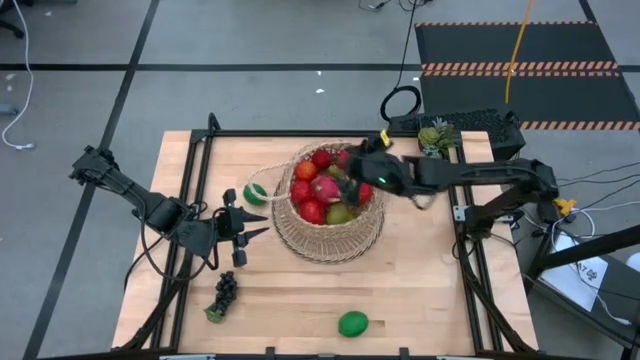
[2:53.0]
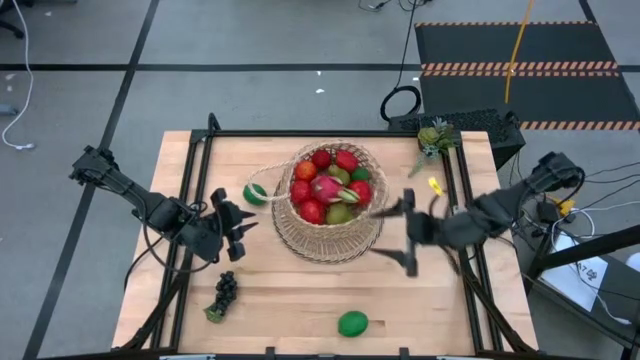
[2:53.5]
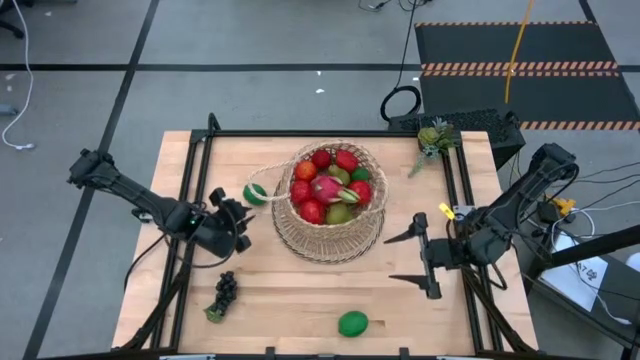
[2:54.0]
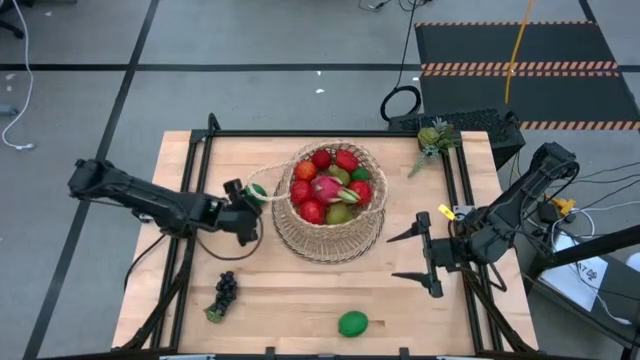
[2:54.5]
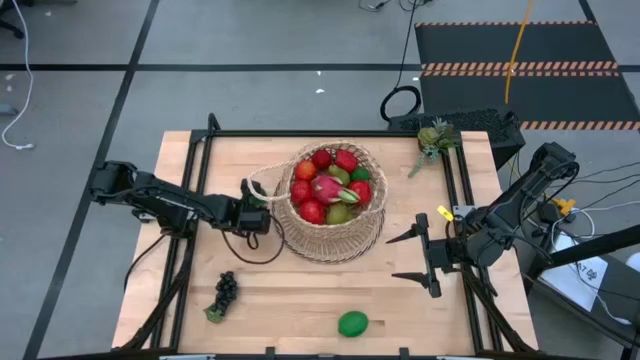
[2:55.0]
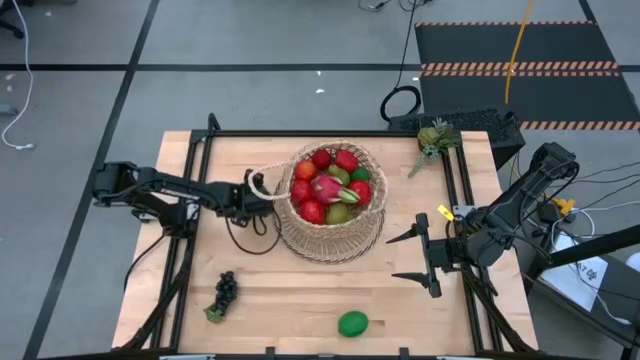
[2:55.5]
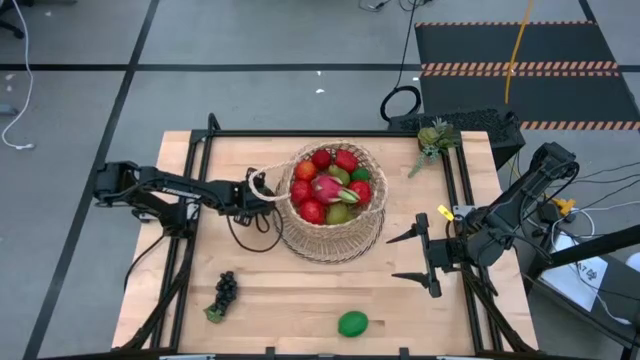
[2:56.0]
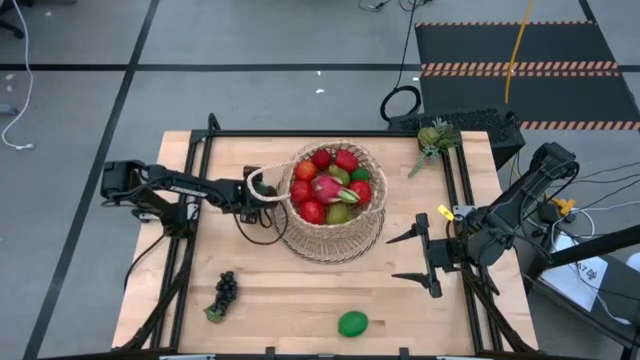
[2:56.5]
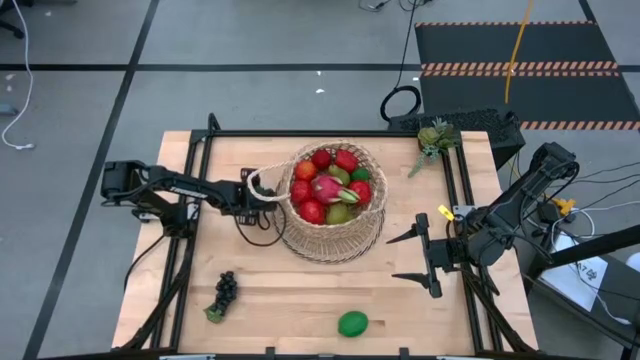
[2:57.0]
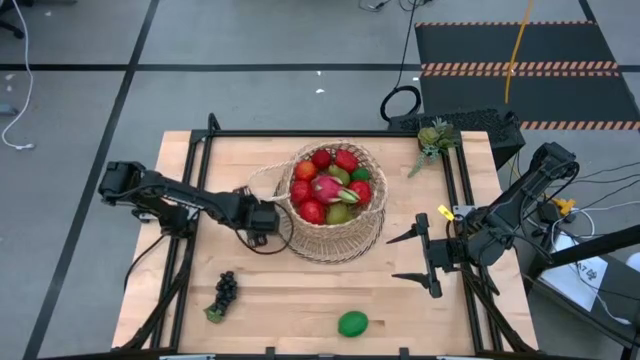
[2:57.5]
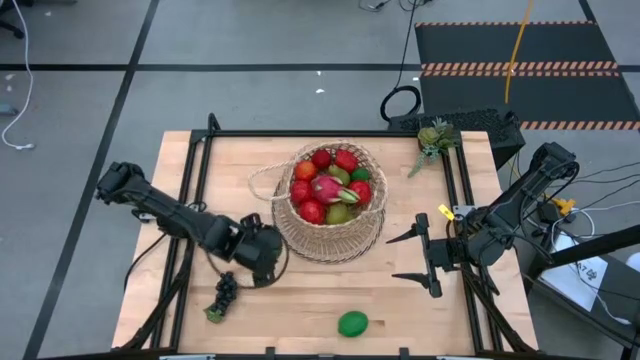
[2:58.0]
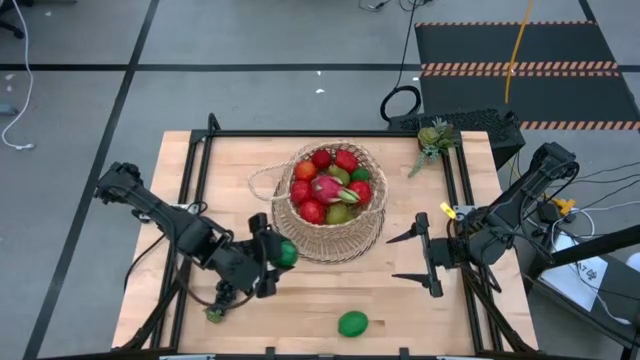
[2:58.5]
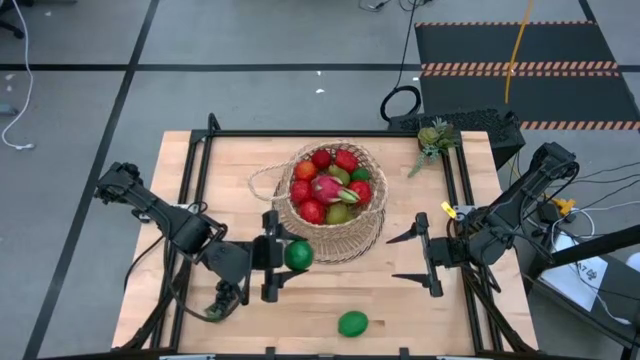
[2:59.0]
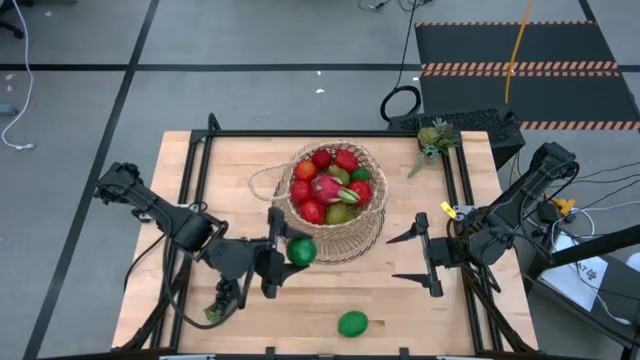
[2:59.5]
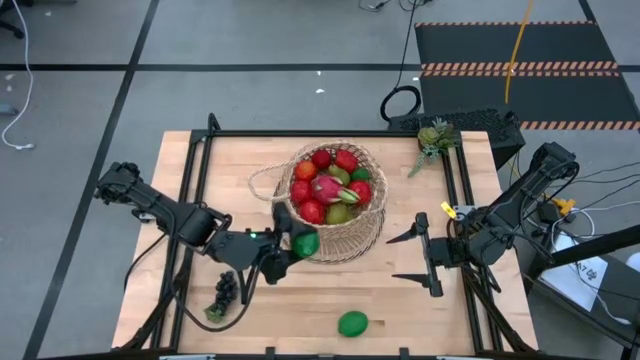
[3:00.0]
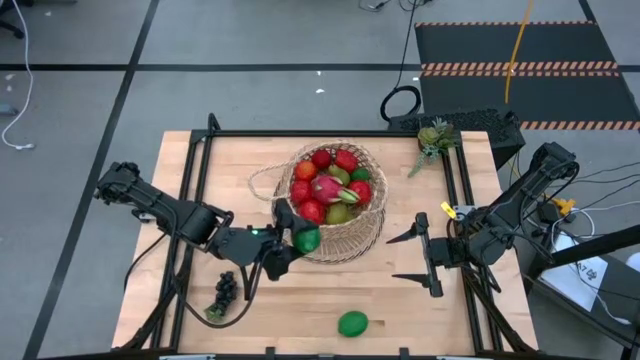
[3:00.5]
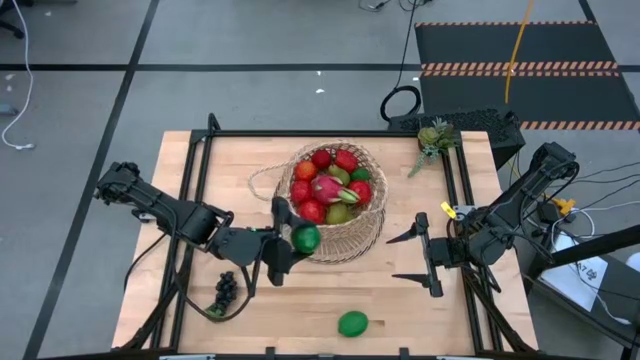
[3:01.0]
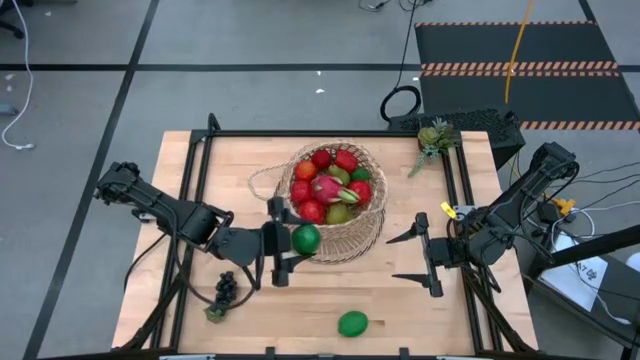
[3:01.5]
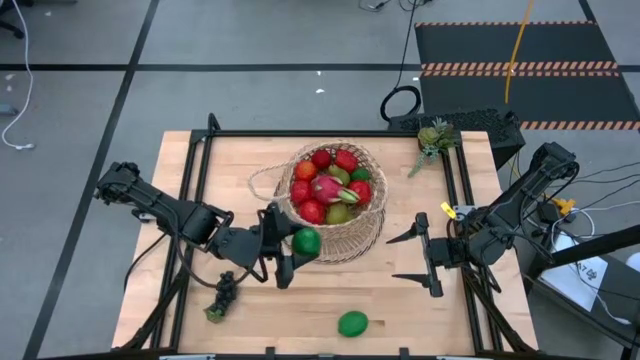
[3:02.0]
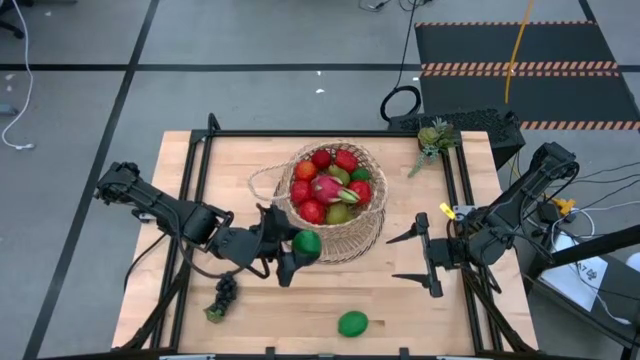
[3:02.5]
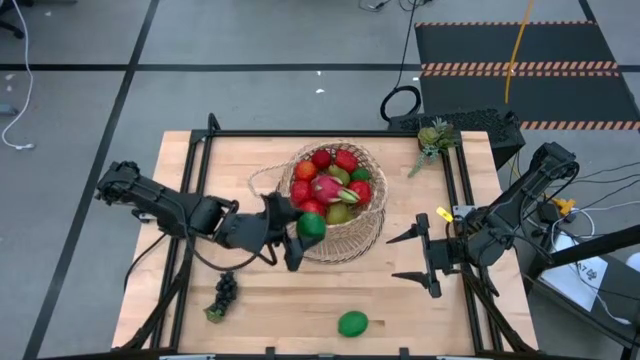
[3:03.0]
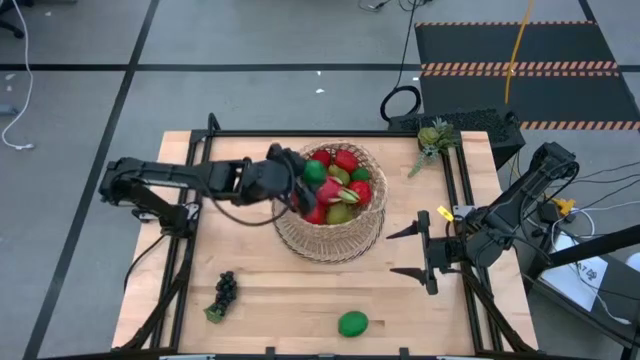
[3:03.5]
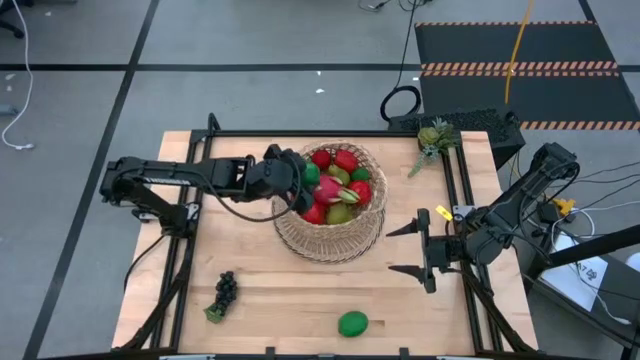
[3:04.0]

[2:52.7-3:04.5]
Task: Build produce basket
Put the left green lime into the basket

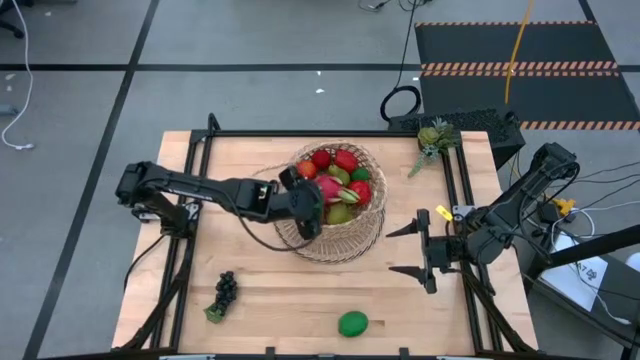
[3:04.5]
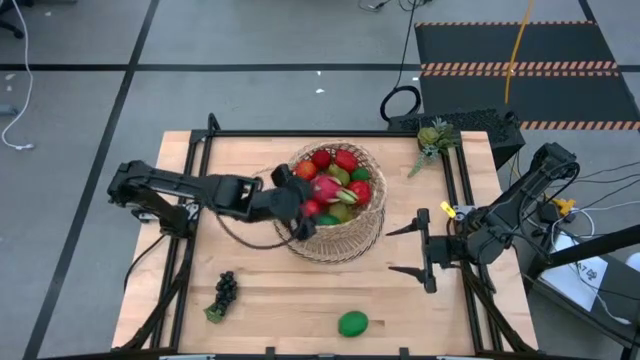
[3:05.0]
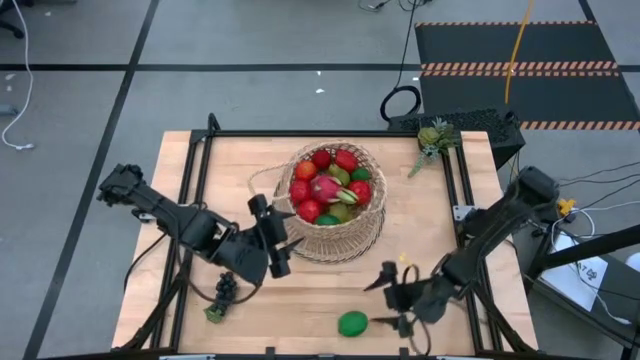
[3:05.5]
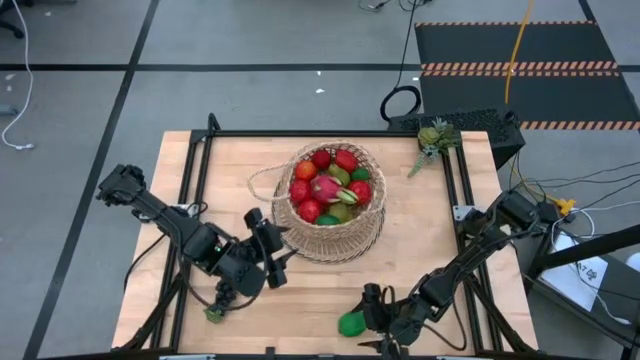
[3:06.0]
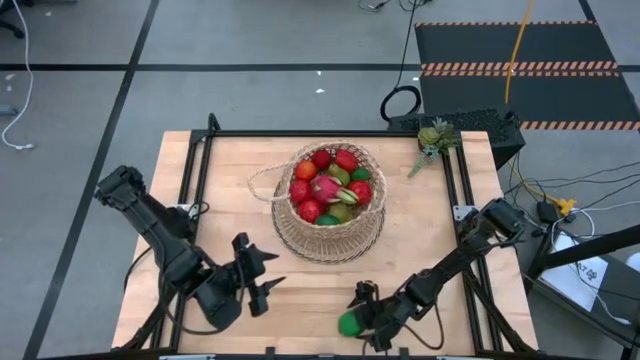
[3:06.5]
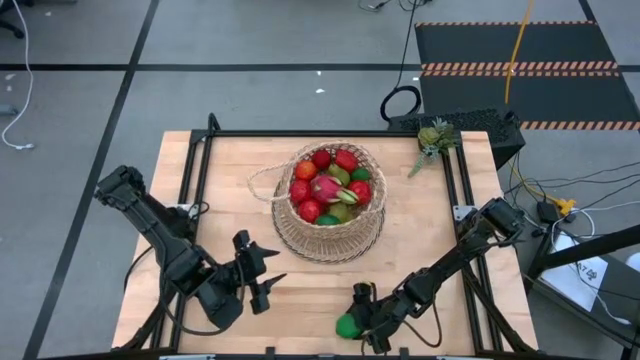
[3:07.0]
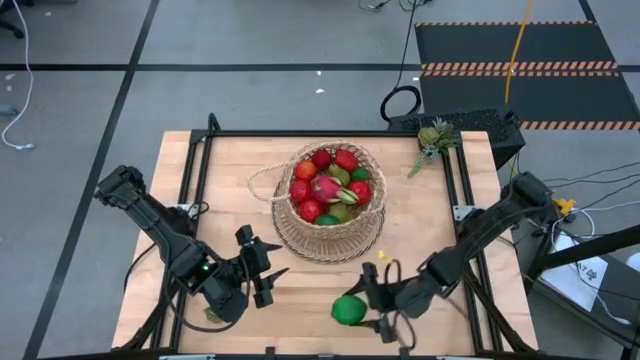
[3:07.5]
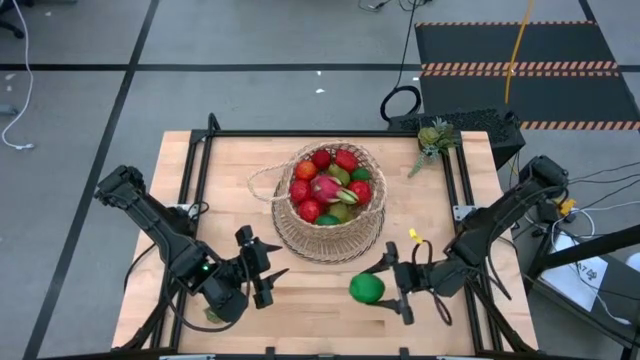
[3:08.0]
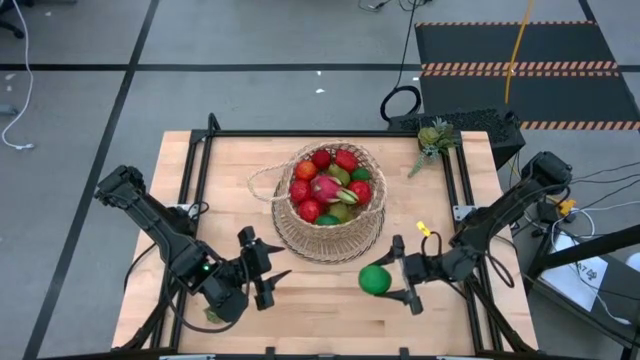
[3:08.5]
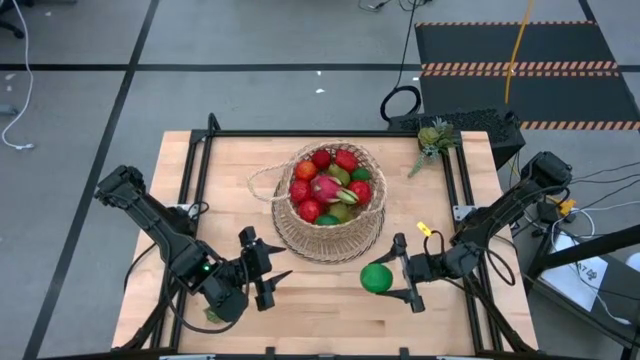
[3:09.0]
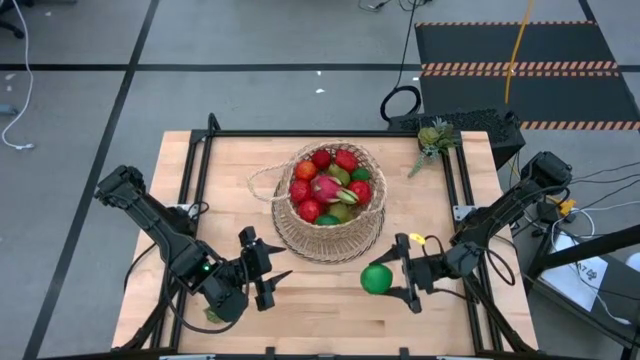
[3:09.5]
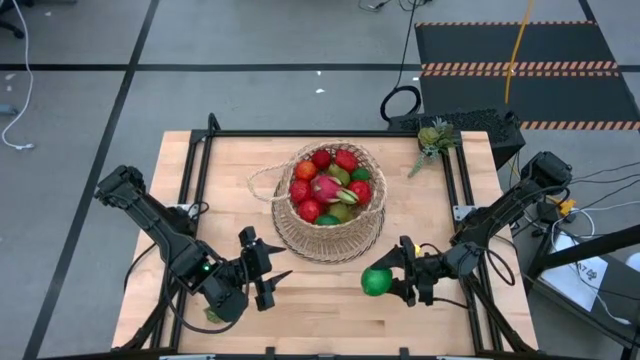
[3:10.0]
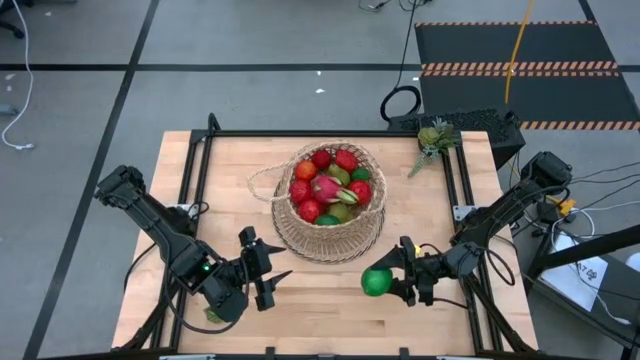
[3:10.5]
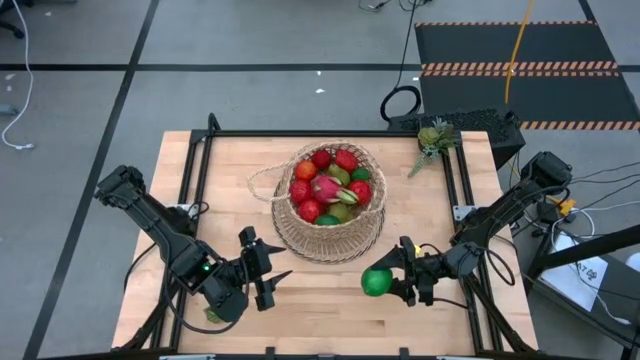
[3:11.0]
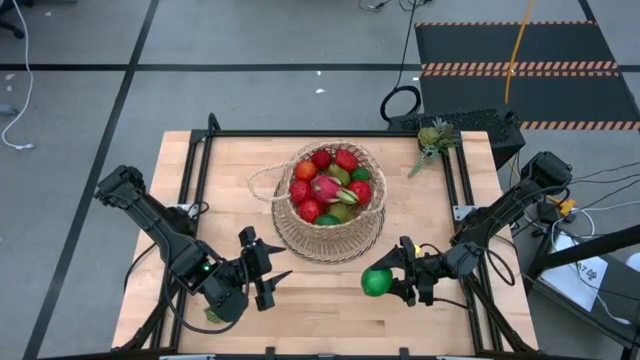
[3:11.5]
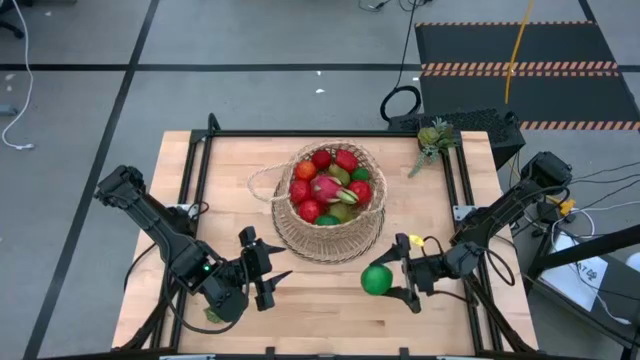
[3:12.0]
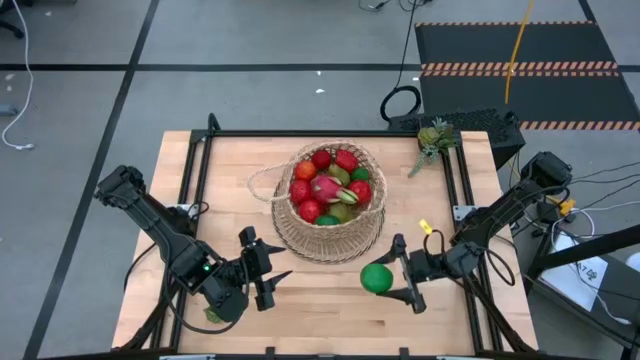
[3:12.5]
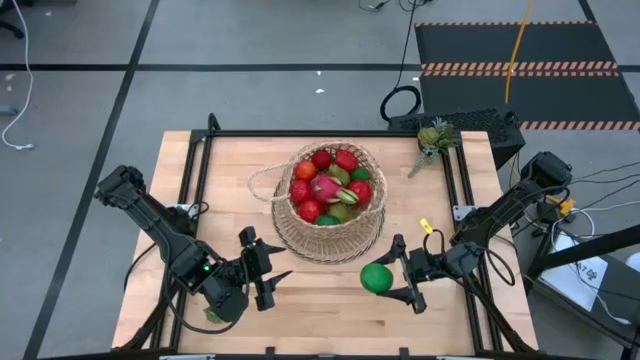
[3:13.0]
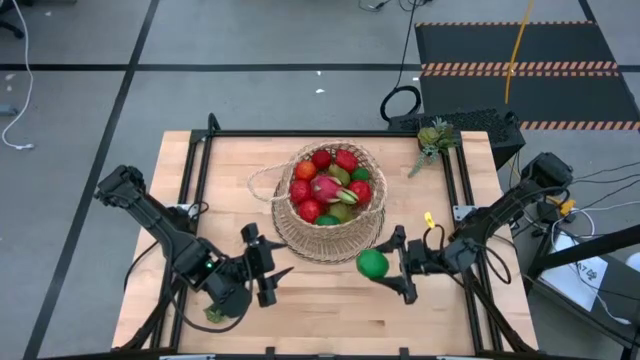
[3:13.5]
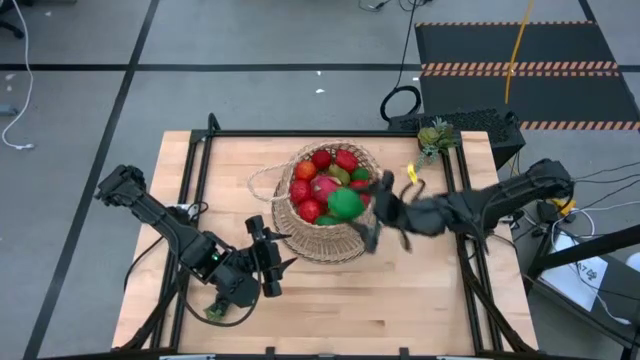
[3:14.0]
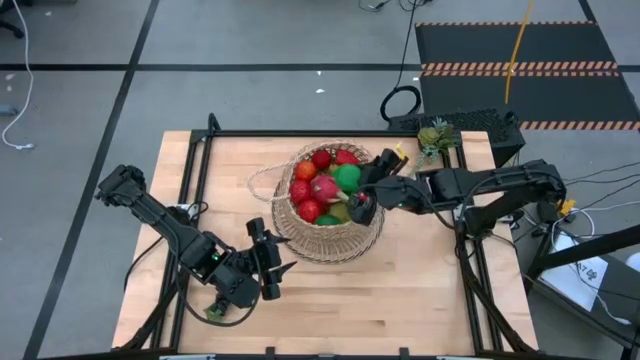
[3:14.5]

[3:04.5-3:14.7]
Put the green lime into the basket
